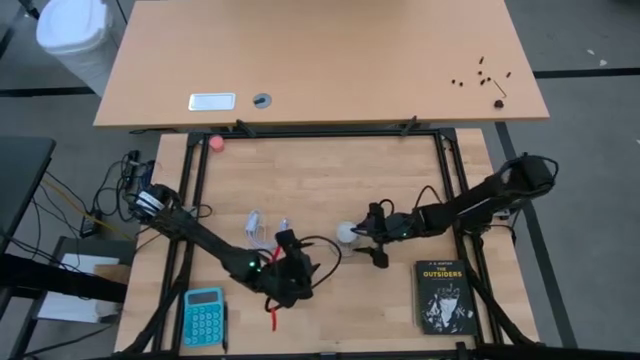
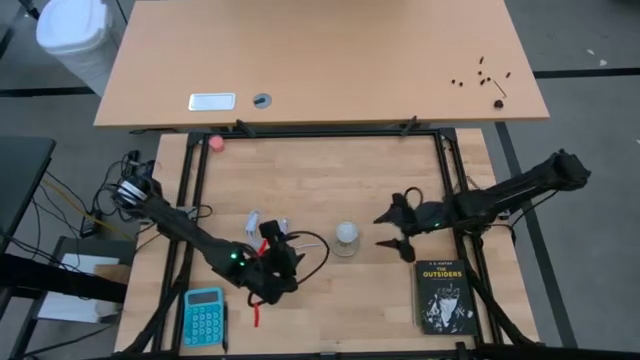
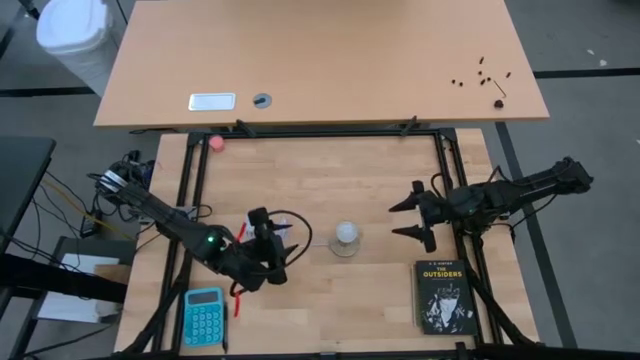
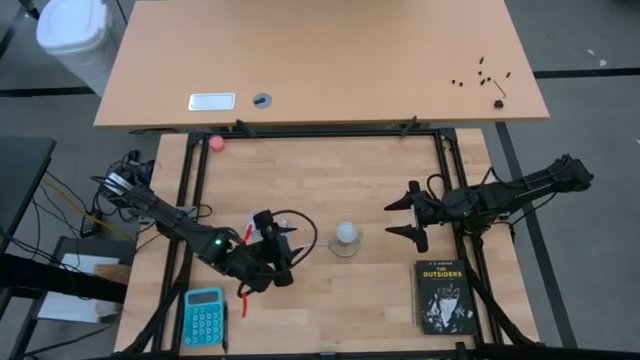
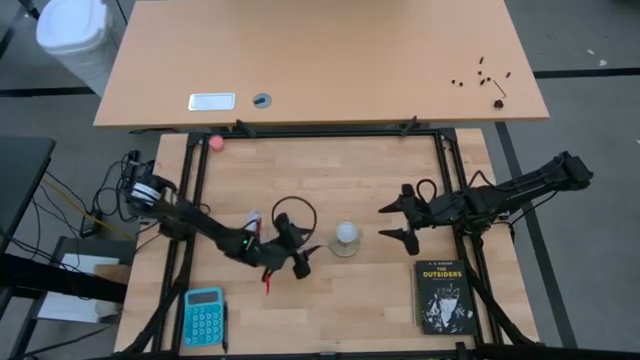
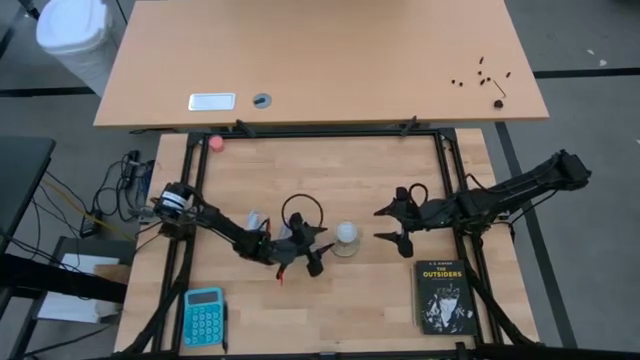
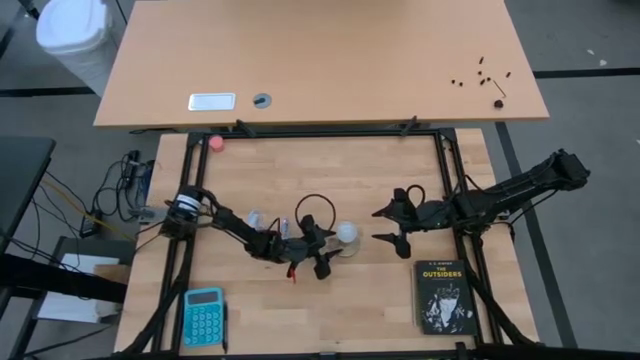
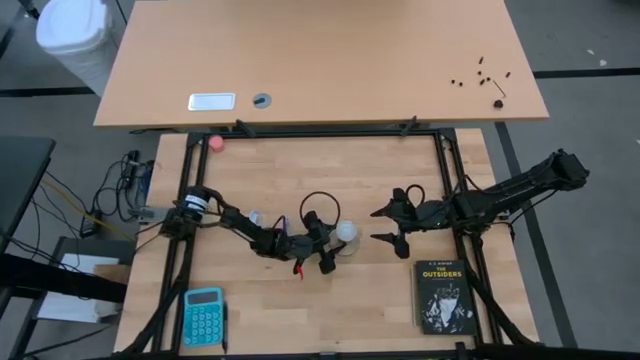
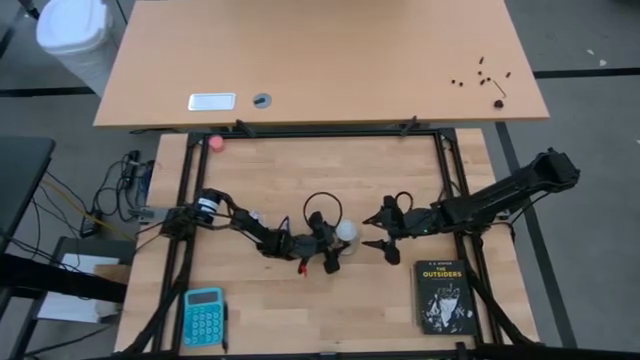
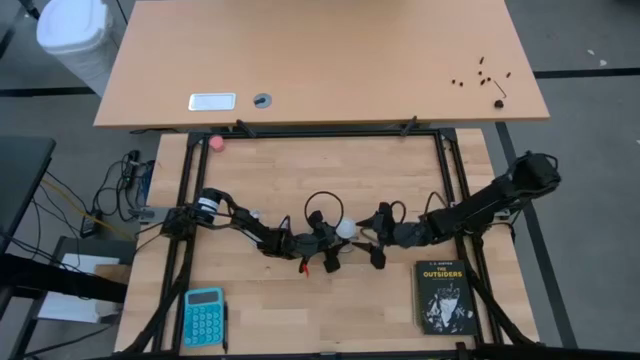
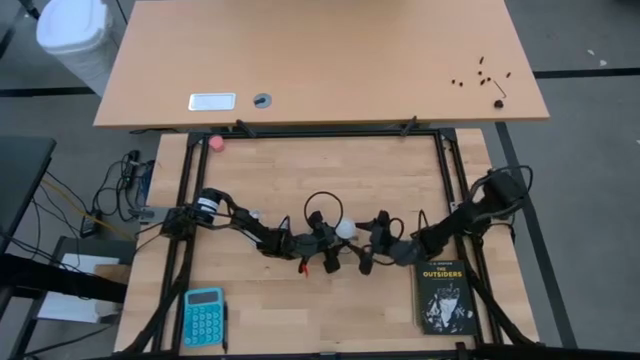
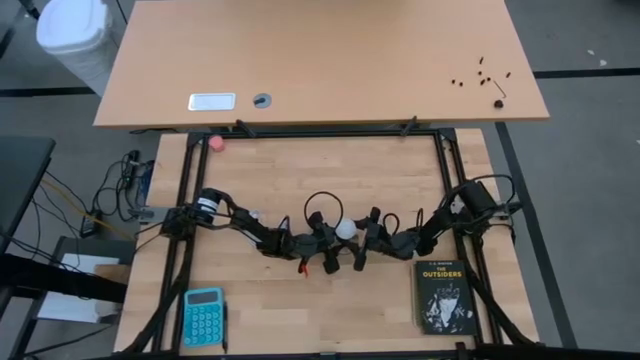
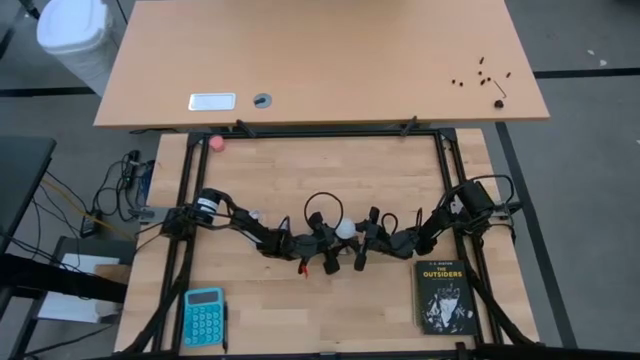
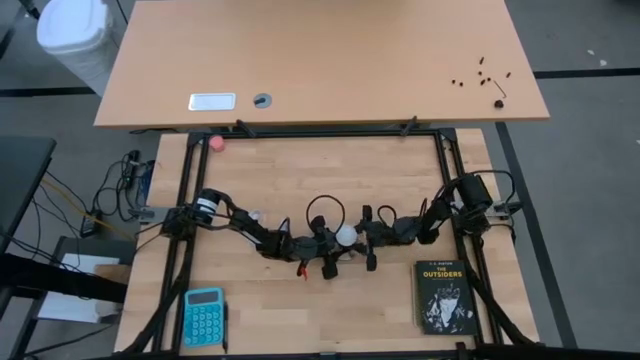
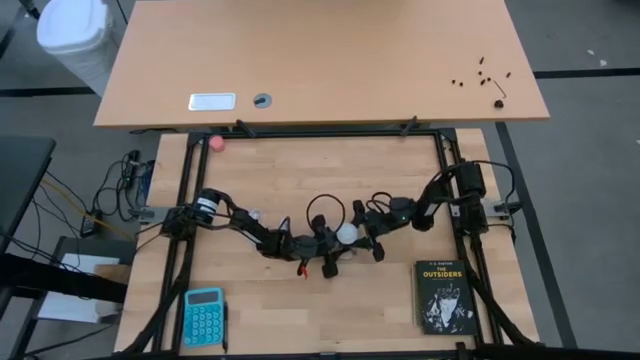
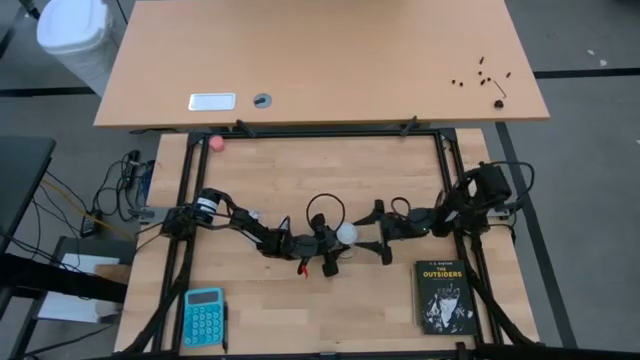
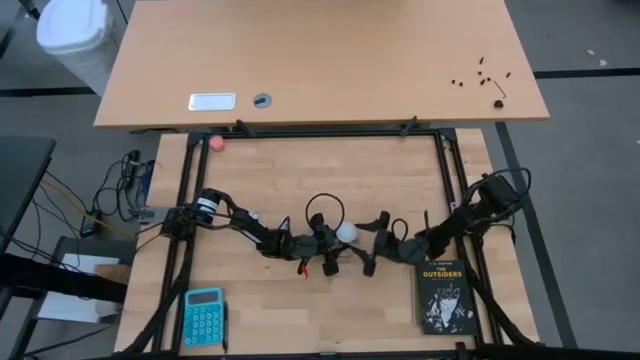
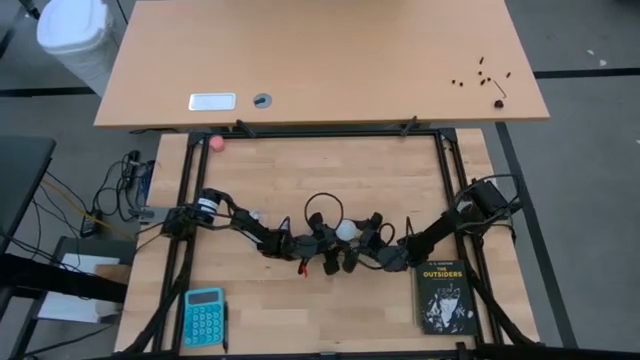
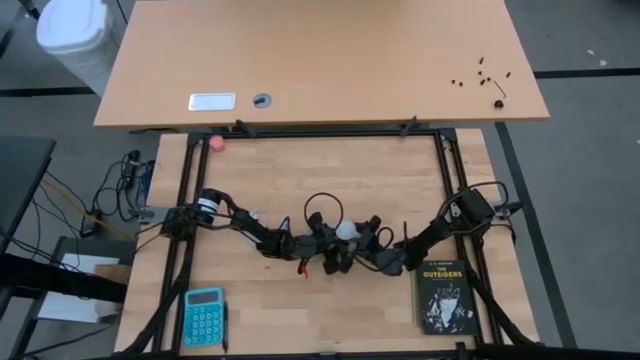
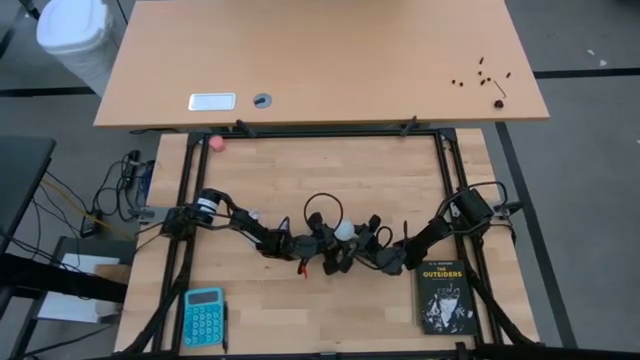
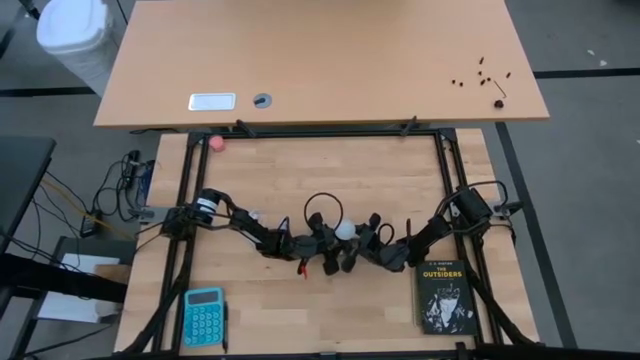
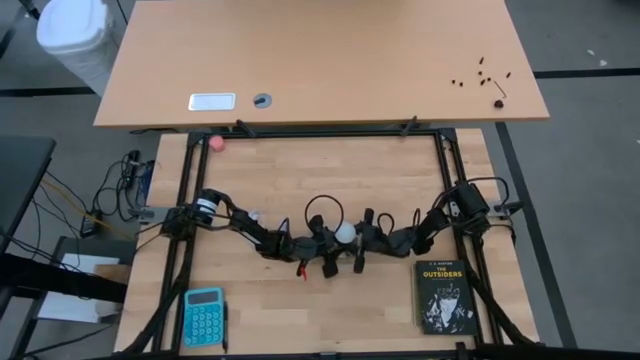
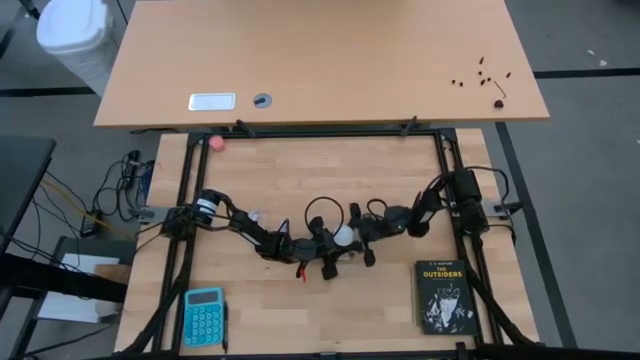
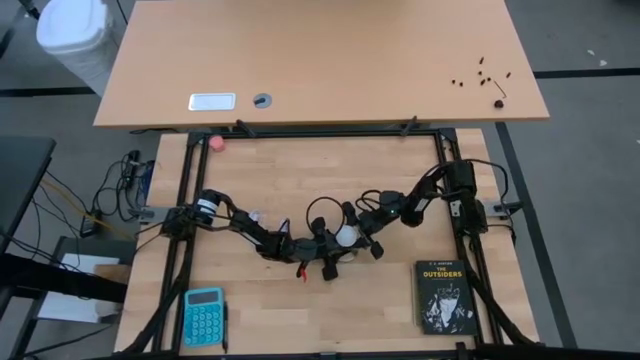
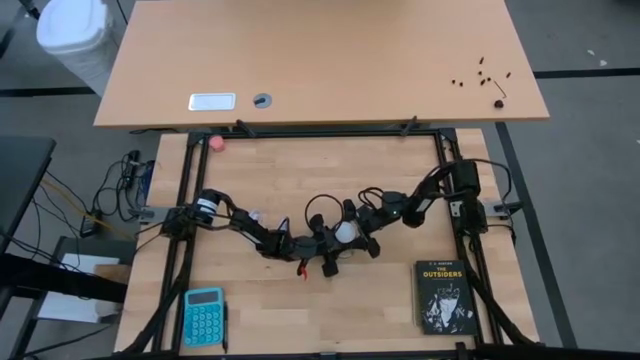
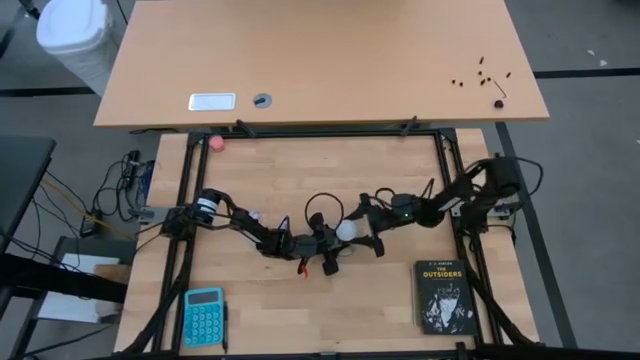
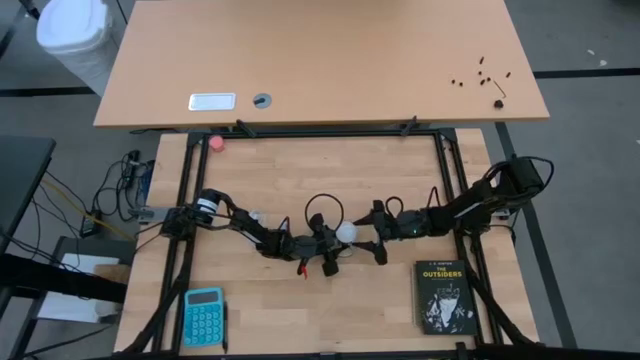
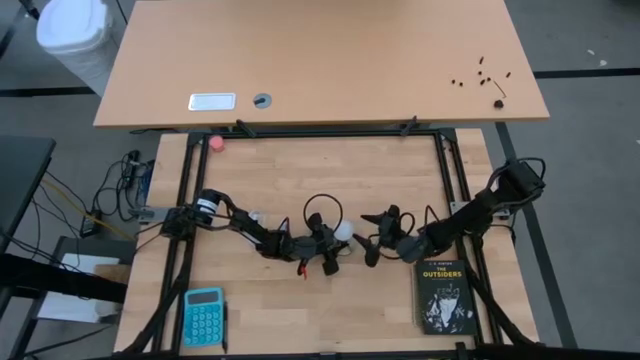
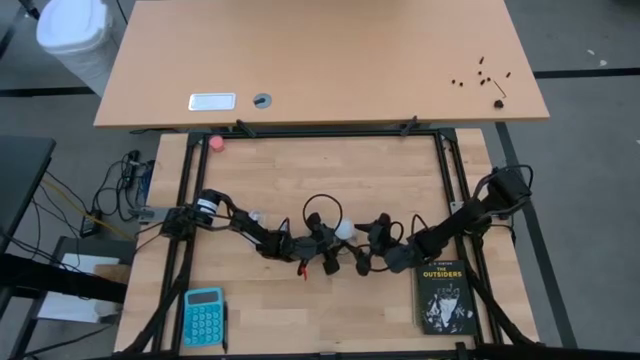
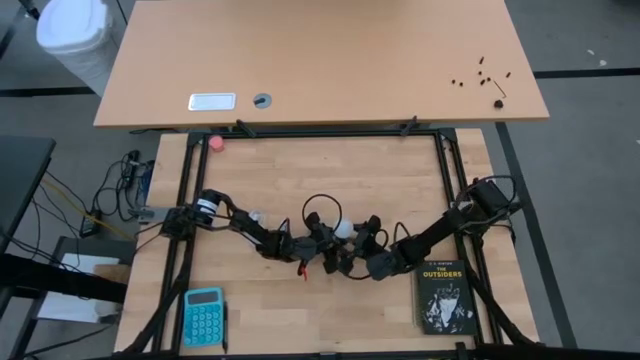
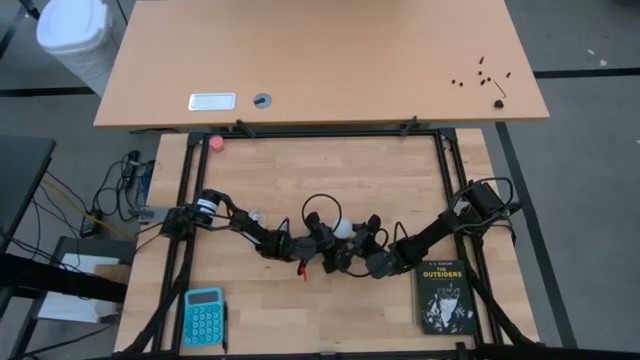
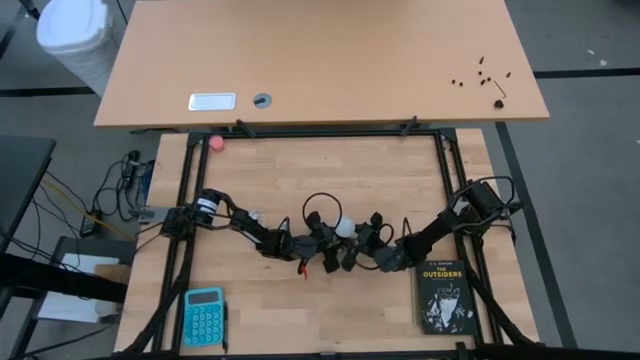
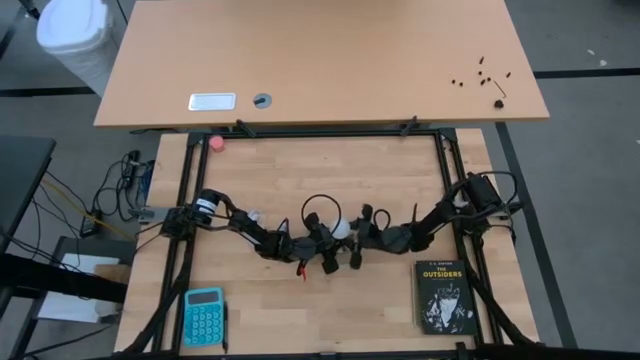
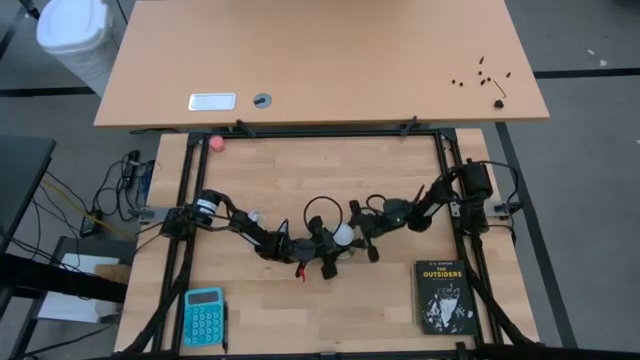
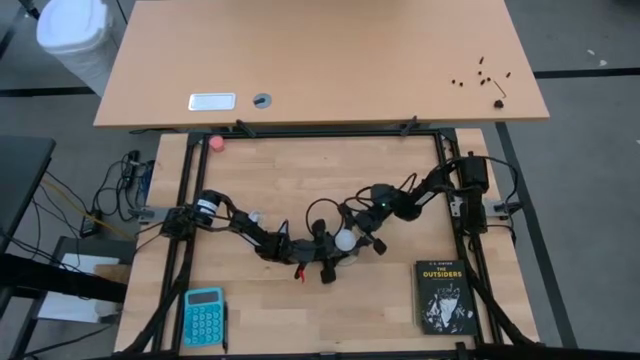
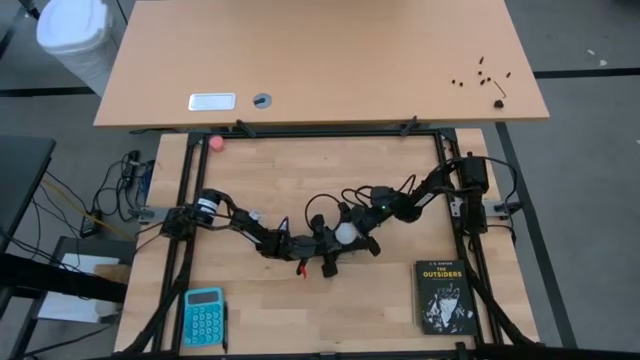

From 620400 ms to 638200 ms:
Task: Screw lightbulb
Remove the white lightbulb from the silver lamp

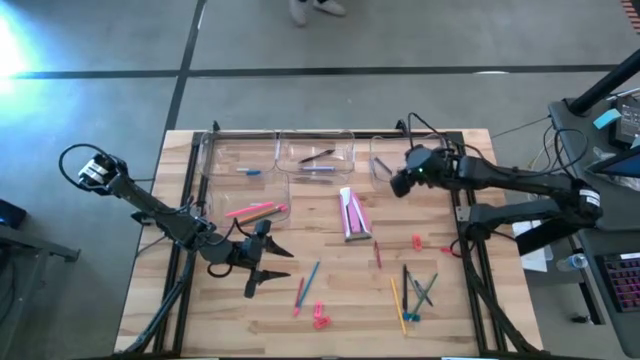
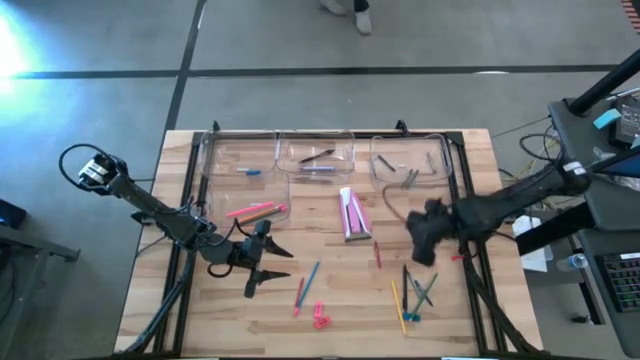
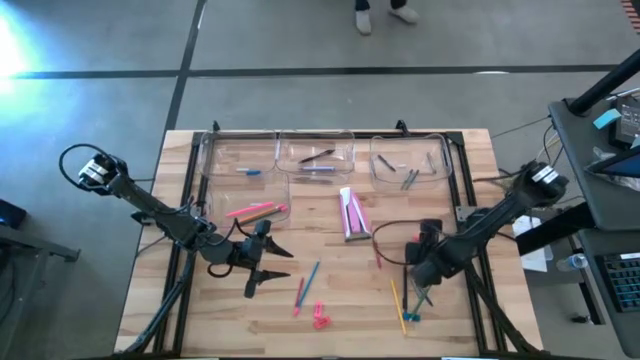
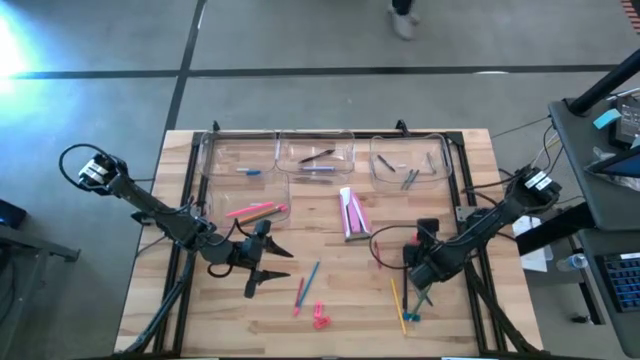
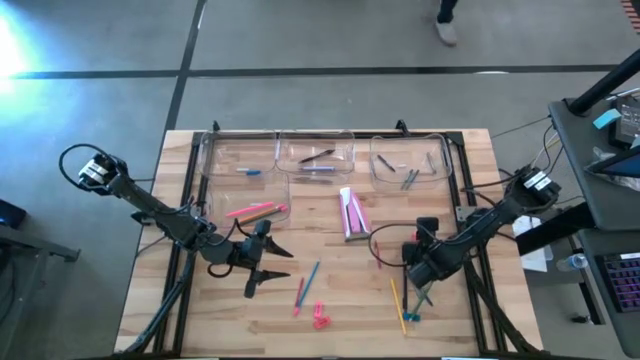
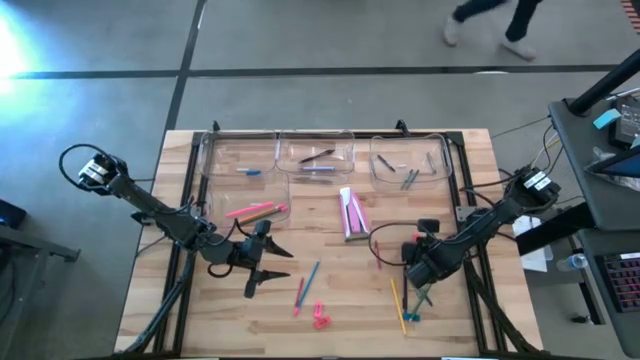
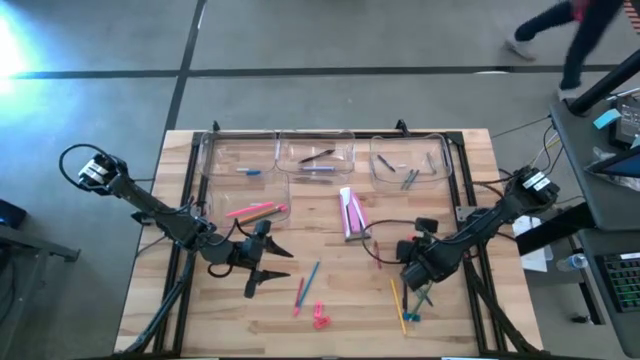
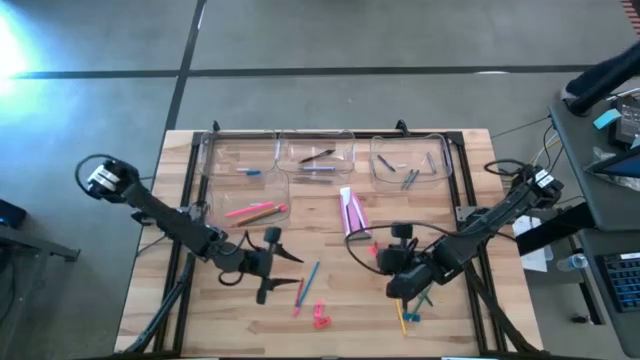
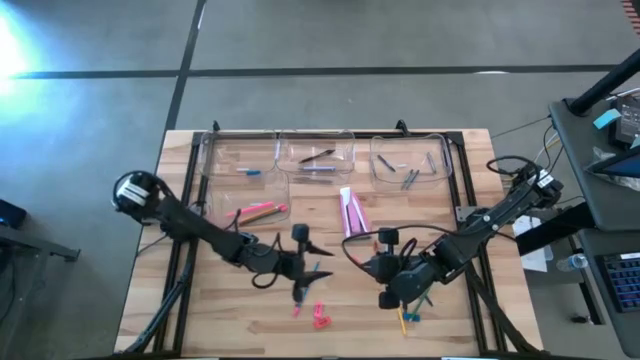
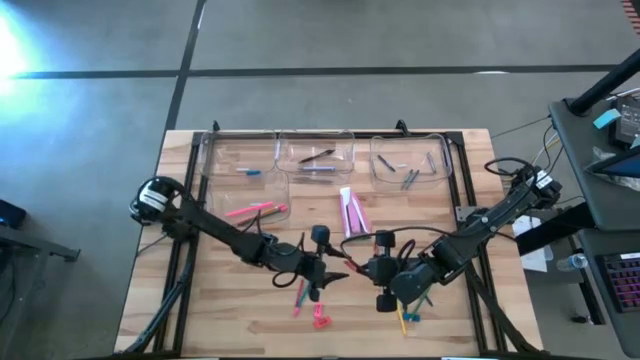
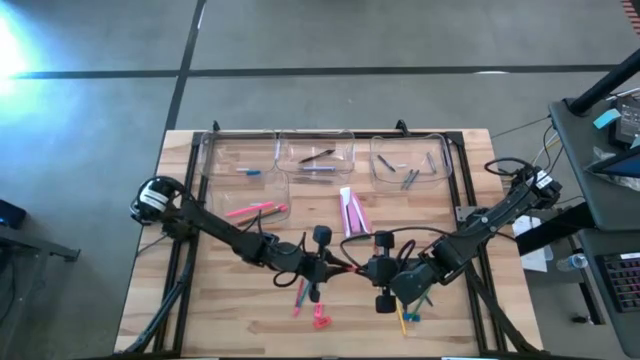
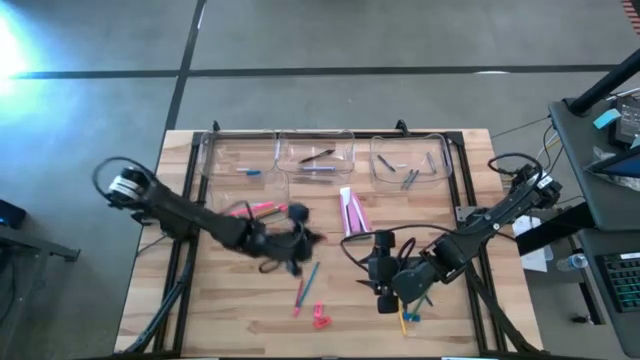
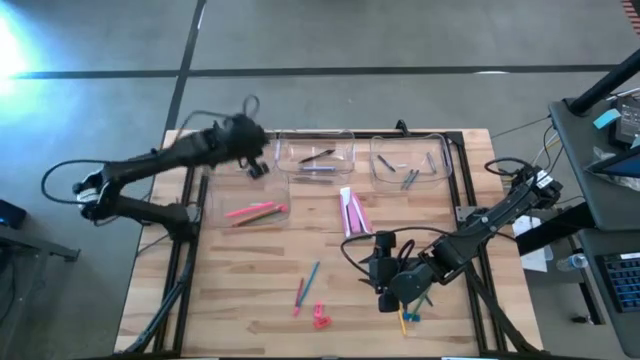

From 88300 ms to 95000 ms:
Task: Sort crayons/erasers/pens/pencils in bins
Put the orange eraser into the top left transparent bin
